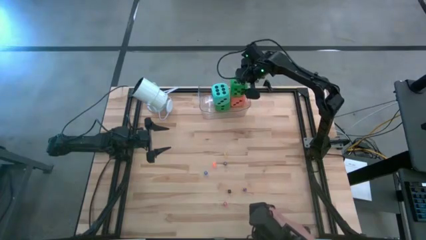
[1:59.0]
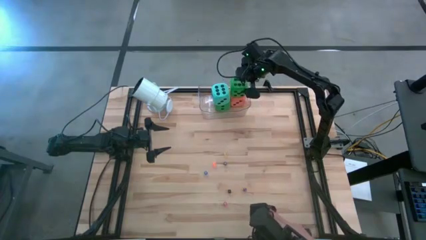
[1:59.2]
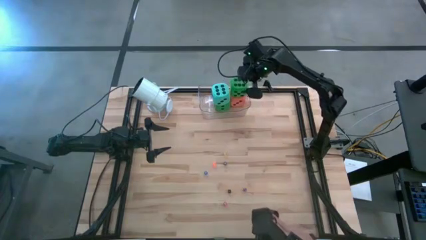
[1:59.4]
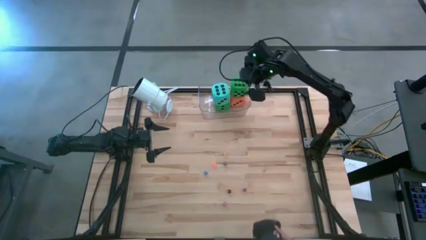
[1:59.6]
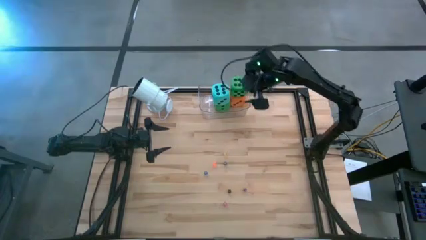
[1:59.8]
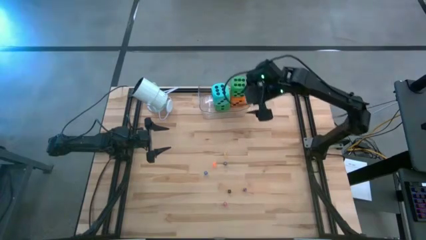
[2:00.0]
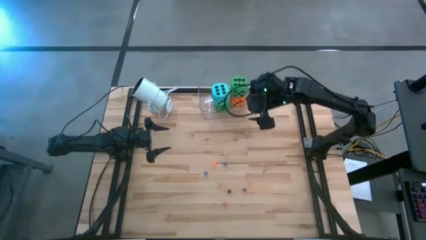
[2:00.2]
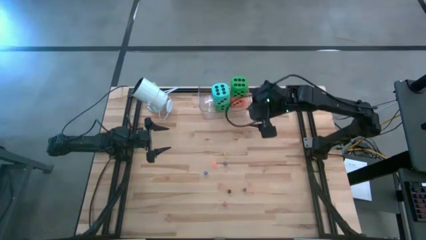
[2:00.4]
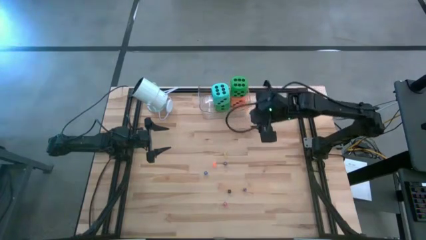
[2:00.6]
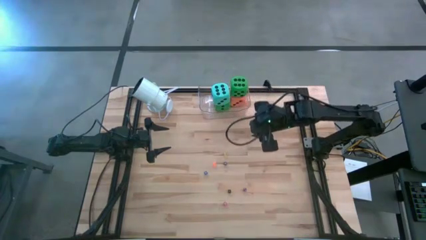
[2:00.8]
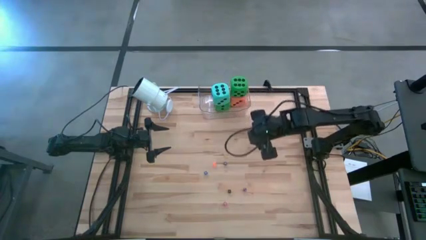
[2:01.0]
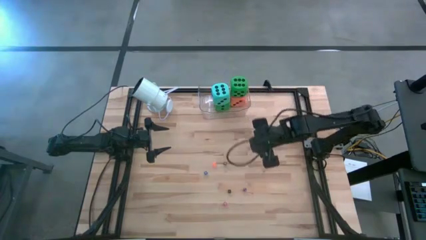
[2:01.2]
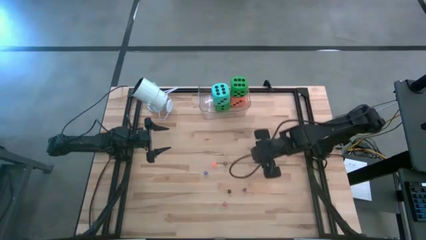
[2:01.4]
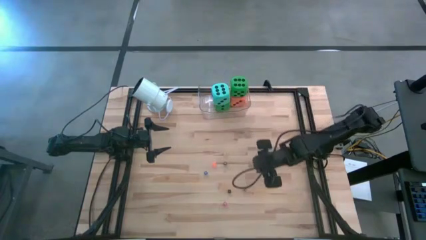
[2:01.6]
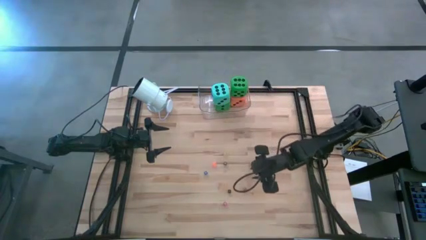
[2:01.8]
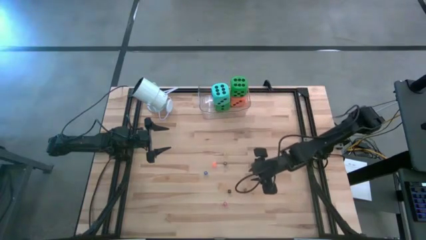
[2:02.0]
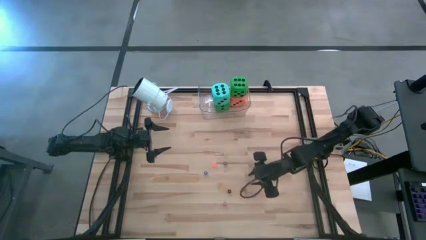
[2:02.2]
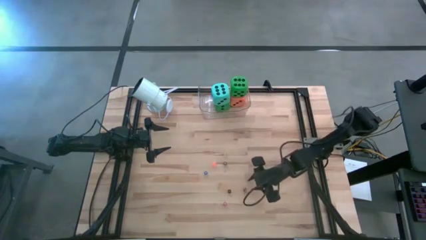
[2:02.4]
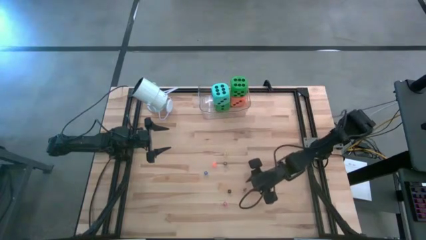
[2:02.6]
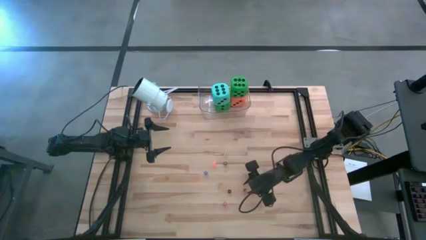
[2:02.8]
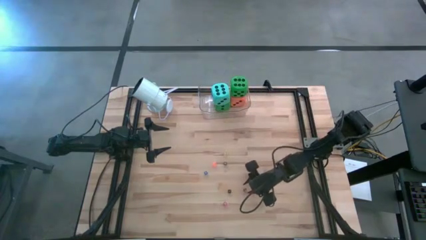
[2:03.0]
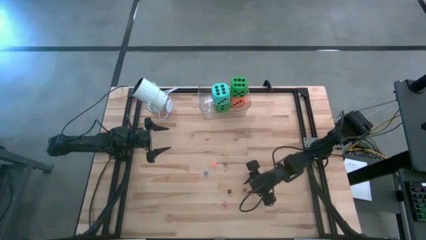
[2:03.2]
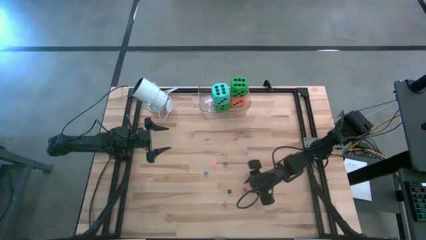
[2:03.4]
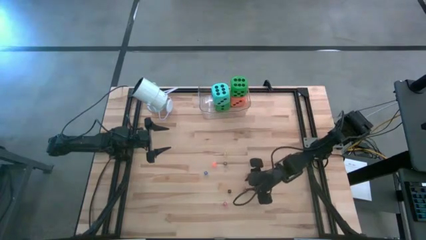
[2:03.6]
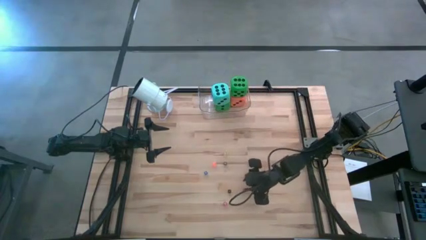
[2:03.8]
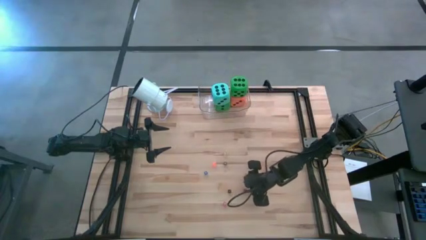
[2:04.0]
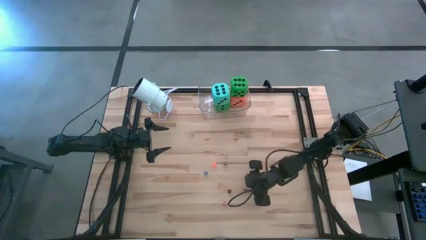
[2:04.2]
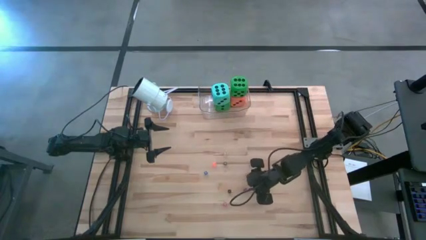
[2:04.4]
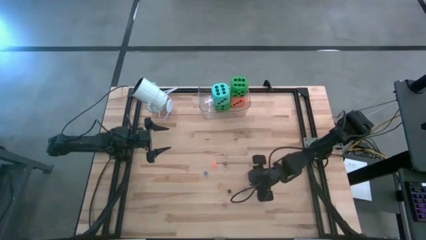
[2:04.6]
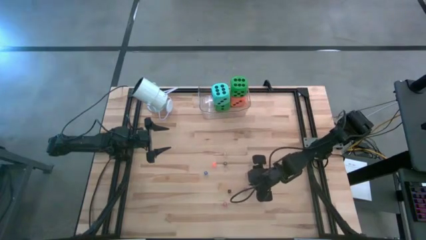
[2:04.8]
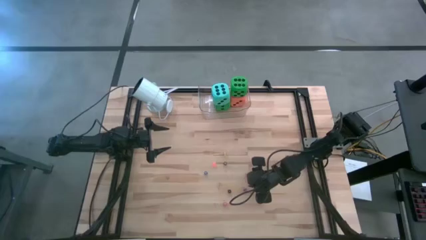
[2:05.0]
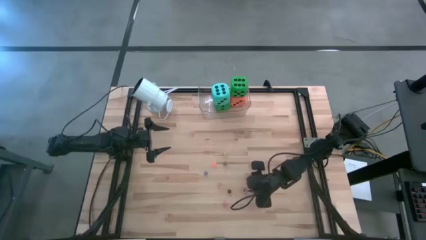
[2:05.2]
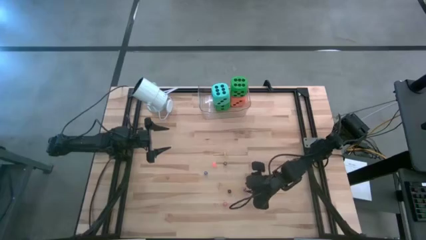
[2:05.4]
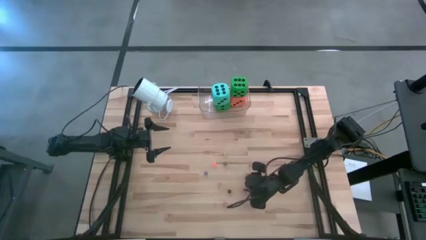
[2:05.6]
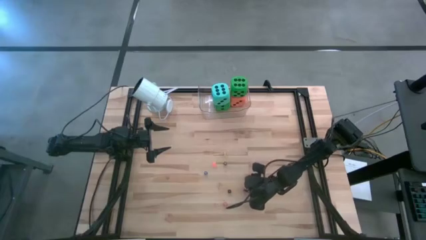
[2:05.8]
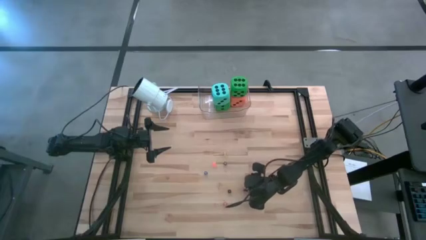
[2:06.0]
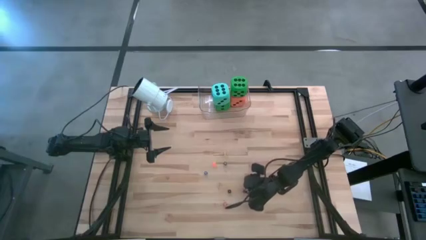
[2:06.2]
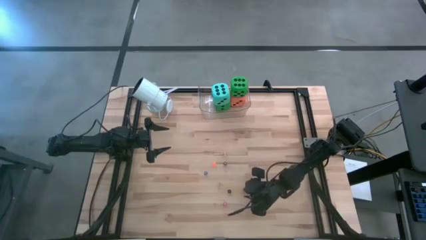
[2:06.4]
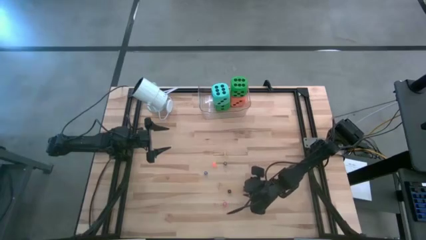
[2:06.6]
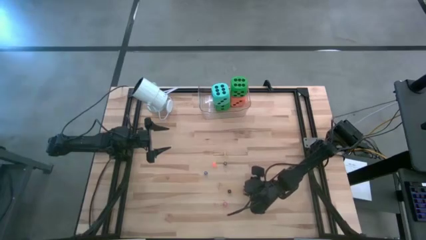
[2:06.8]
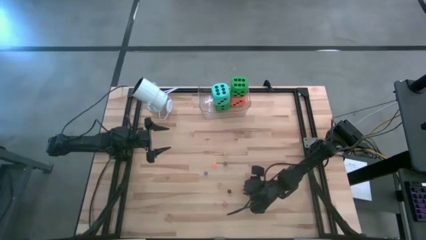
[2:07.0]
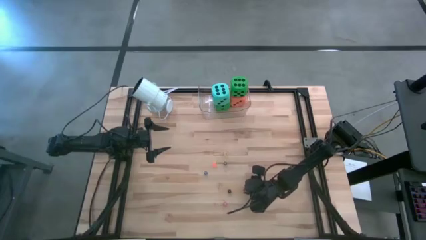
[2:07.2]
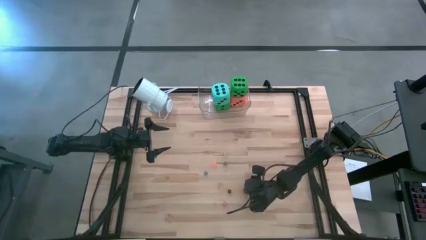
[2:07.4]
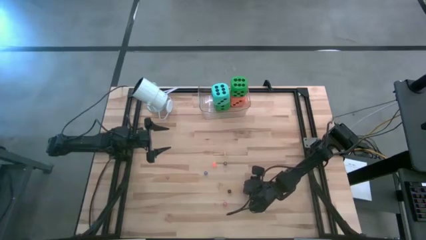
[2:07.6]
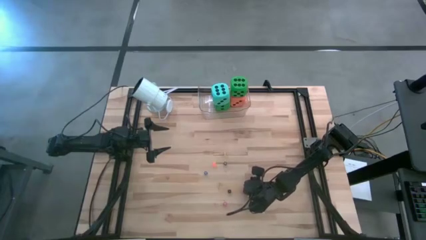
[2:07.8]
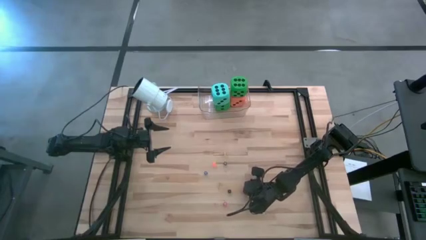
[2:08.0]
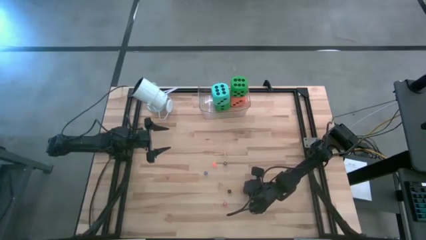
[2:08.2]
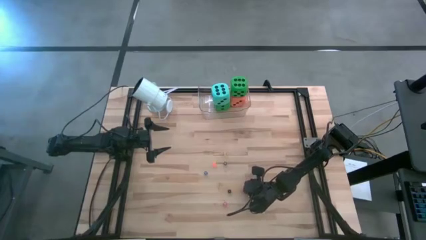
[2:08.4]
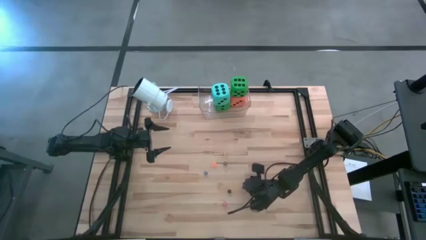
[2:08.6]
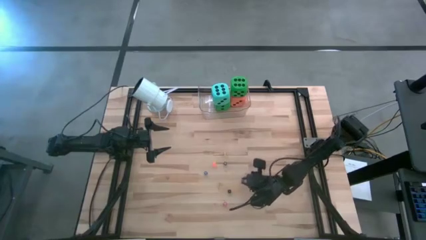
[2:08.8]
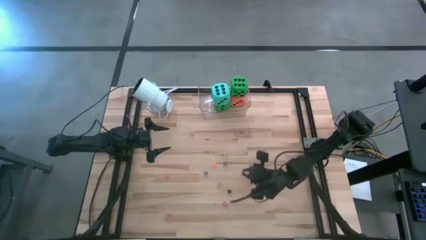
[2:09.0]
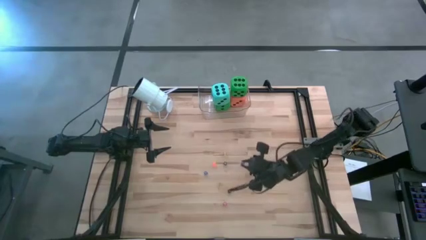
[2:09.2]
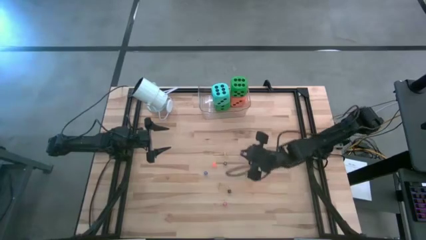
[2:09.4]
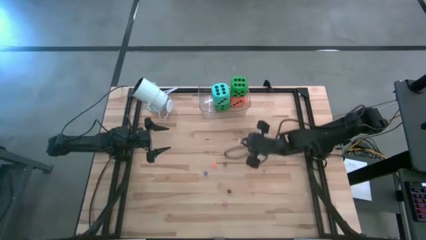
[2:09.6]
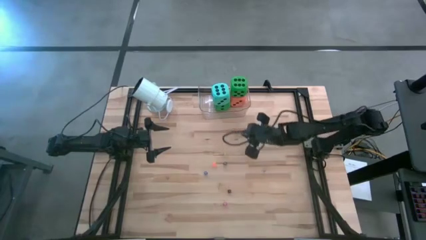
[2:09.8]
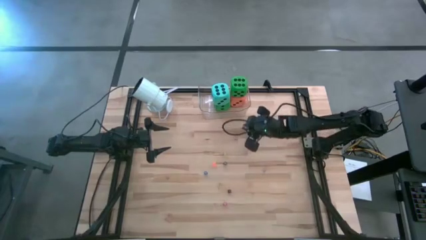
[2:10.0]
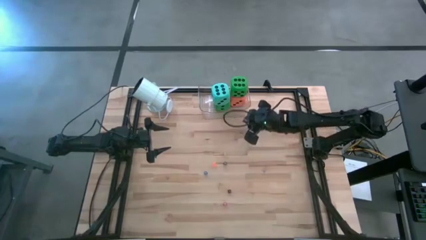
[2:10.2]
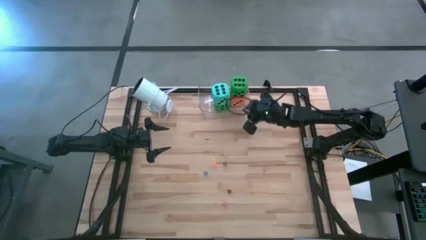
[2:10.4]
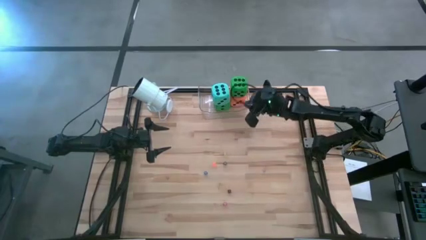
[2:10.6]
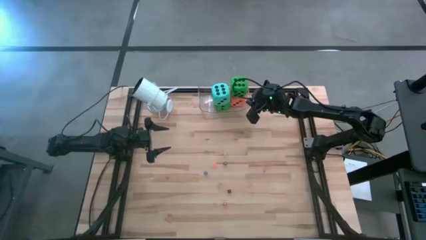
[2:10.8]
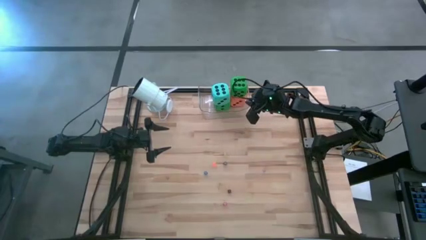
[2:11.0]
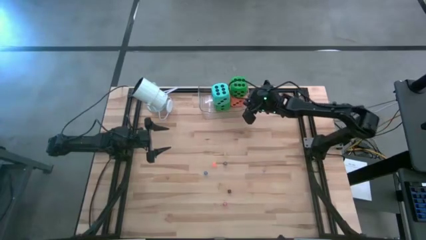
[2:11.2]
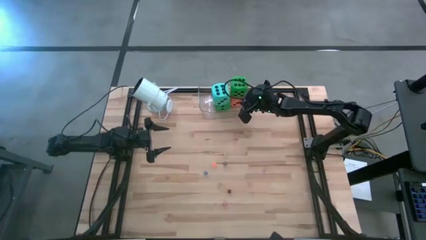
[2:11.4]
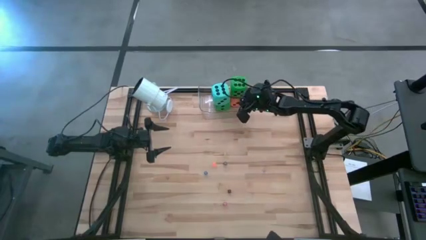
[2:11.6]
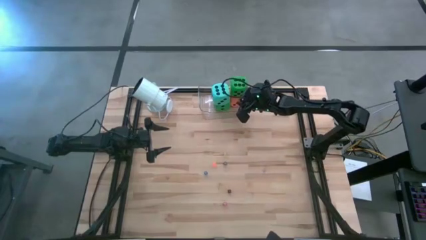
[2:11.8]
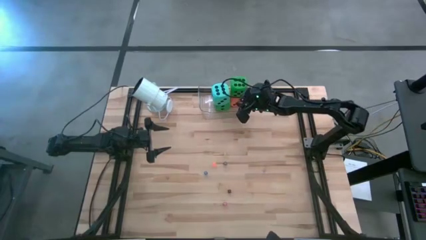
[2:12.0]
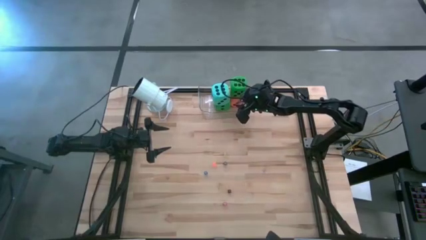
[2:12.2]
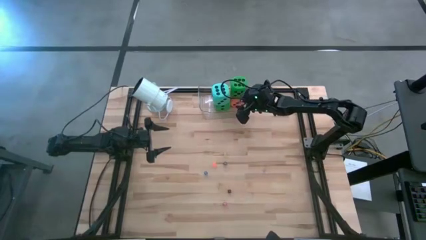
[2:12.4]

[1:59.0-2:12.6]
Task: Pick & Place Dice
Put the small violet dice into the transparent bin

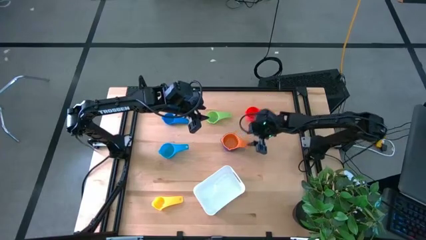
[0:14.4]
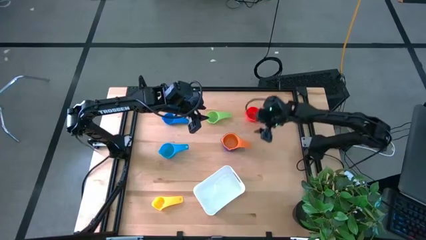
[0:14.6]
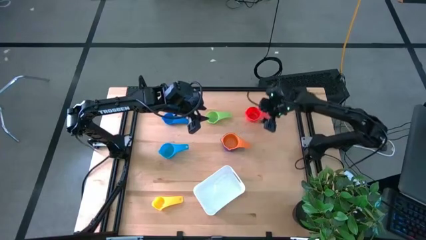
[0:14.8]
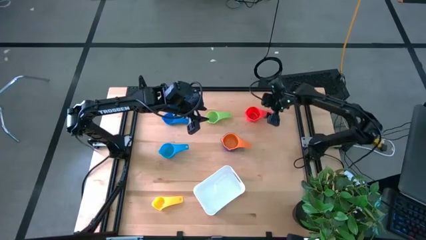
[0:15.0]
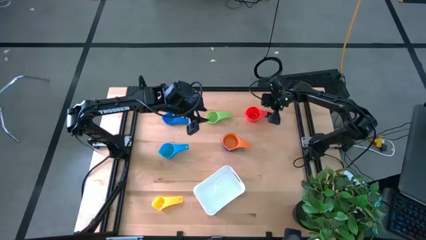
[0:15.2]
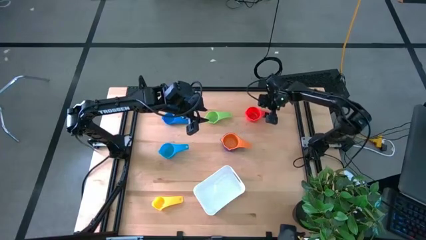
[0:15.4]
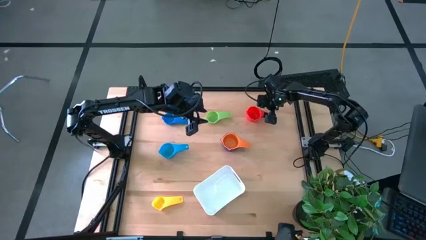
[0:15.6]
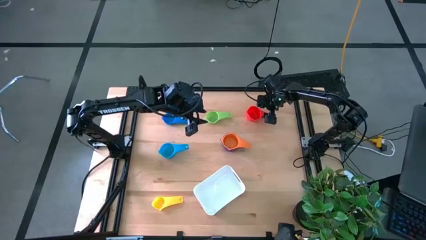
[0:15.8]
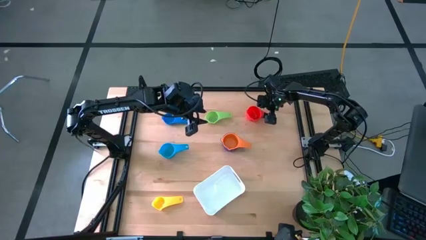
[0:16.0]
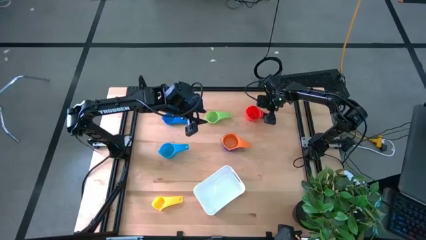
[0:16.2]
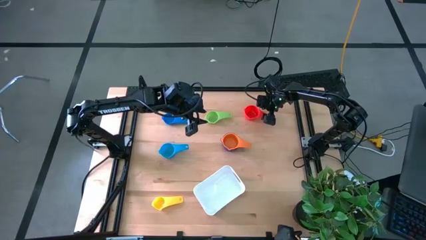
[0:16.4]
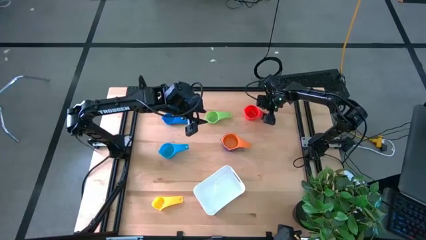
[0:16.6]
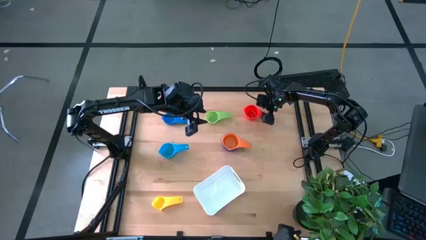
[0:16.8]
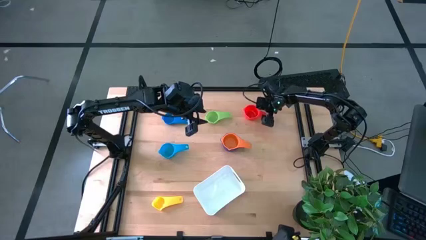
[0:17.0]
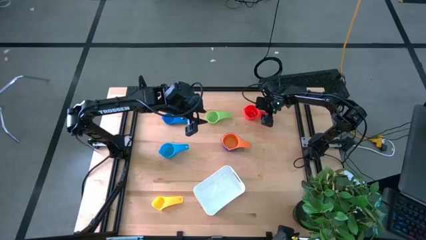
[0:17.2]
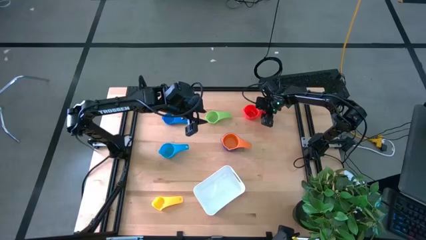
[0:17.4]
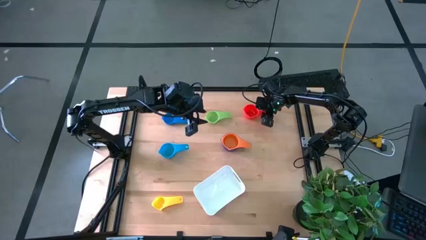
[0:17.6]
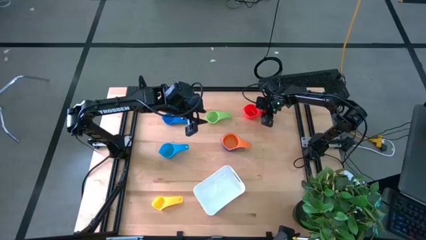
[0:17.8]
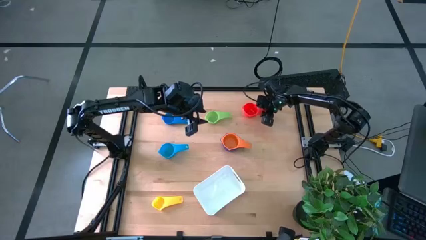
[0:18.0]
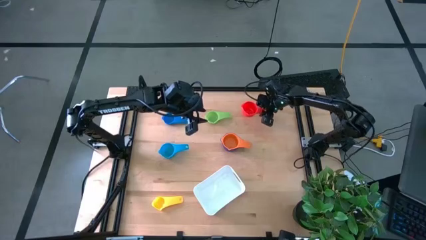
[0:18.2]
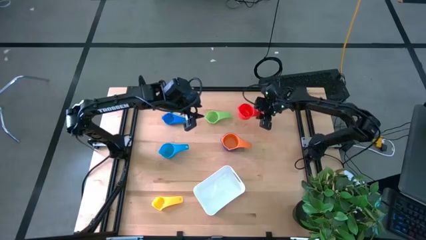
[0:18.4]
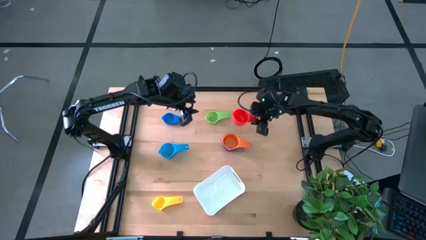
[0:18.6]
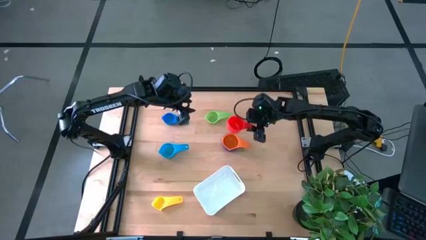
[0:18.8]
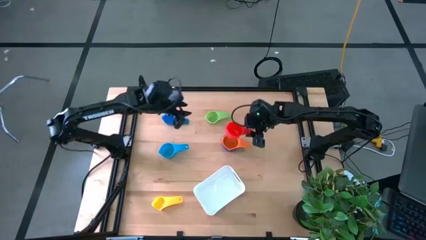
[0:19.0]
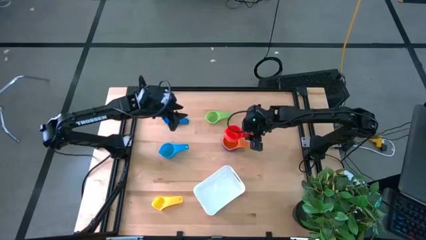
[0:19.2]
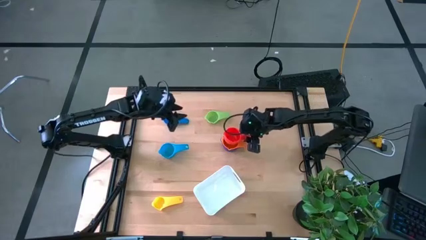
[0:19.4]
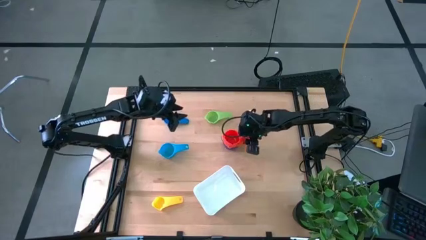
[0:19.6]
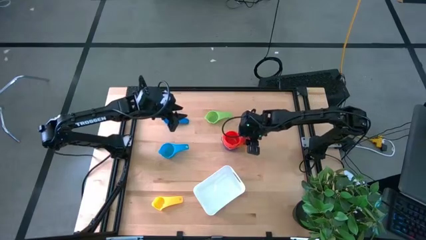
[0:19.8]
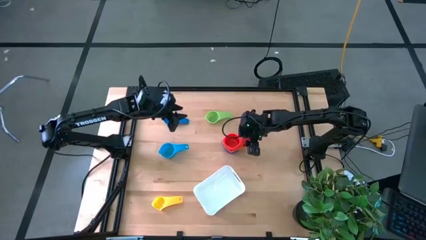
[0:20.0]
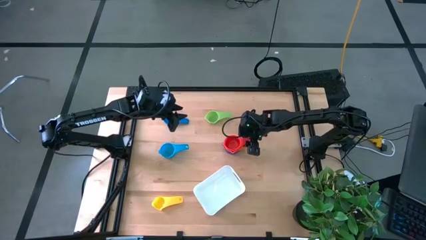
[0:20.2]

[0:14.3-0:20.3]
Task: Nest measuring cups in basket
Stack the red measuring cup on top of the orange measuring cup
